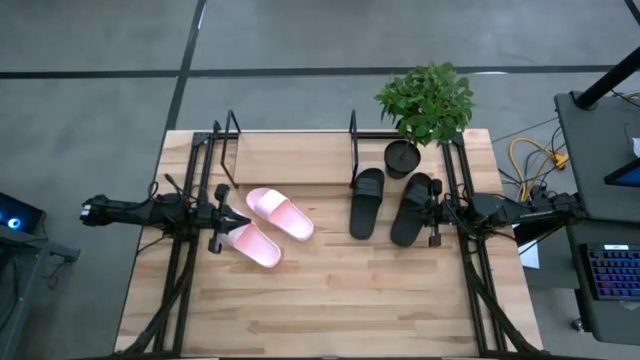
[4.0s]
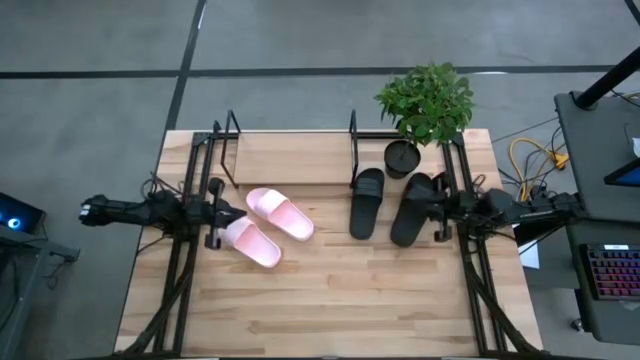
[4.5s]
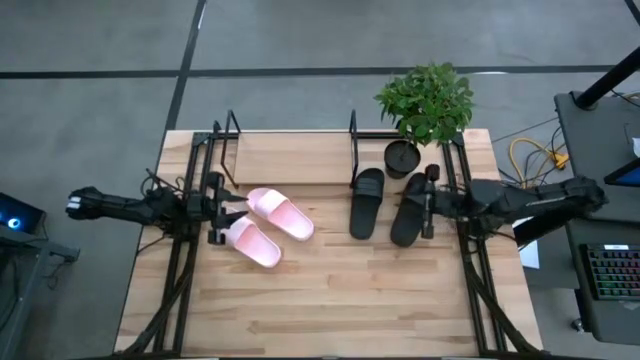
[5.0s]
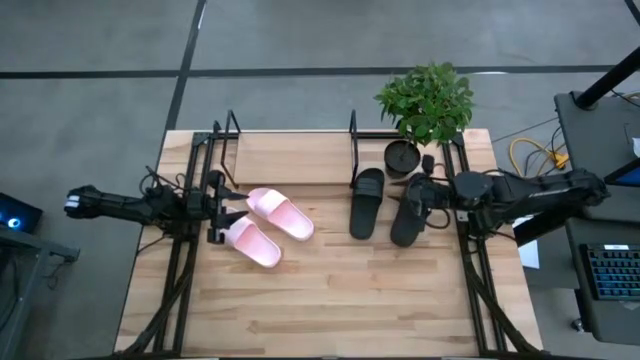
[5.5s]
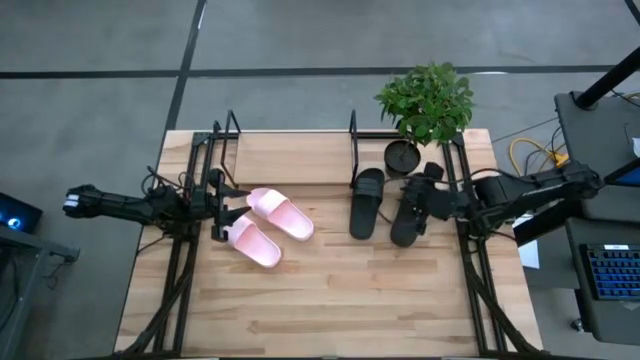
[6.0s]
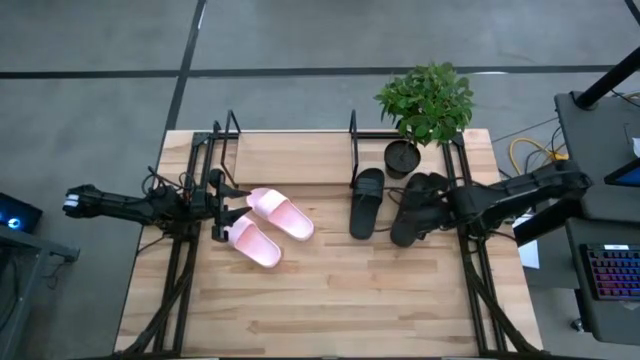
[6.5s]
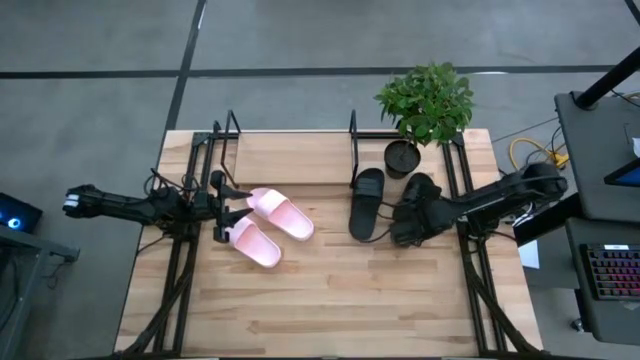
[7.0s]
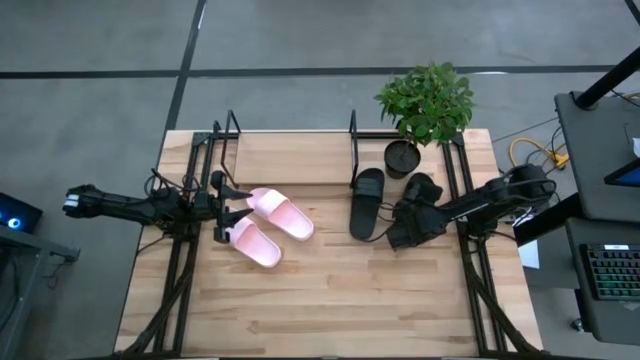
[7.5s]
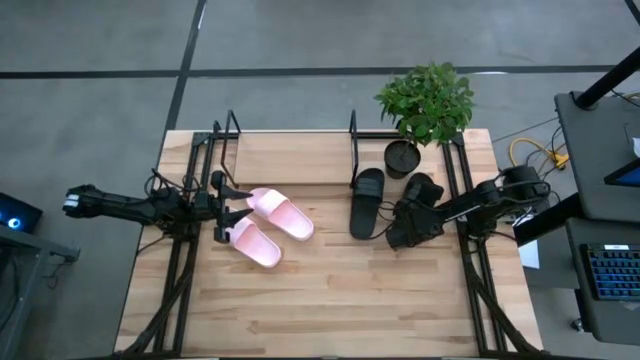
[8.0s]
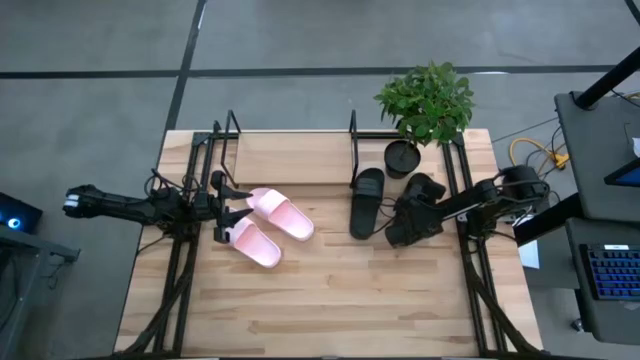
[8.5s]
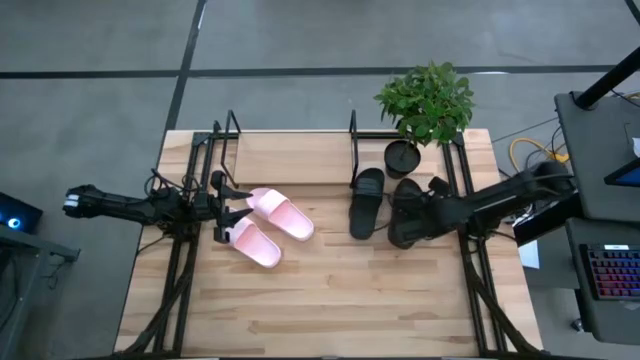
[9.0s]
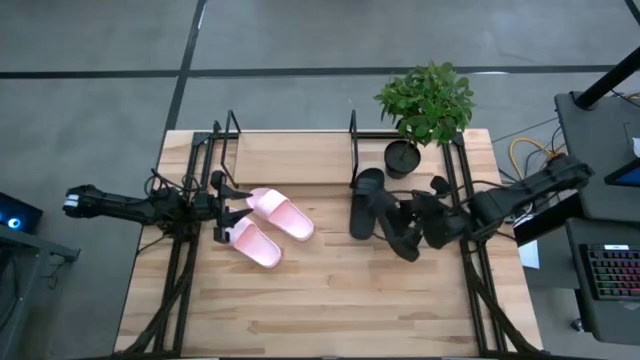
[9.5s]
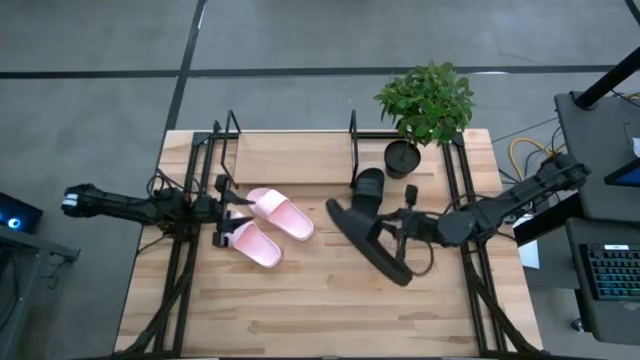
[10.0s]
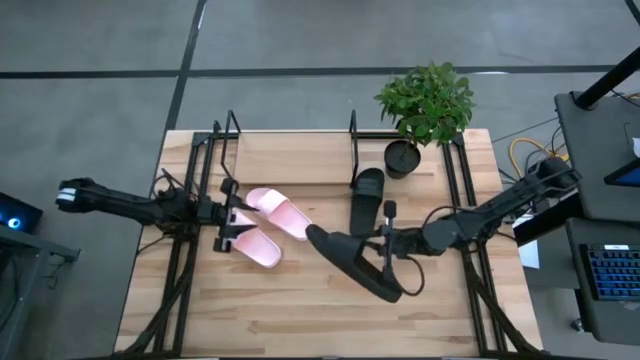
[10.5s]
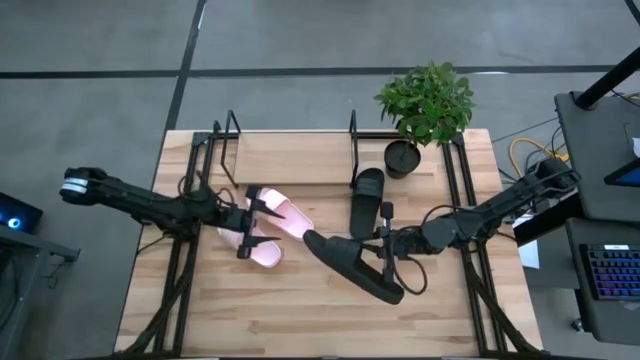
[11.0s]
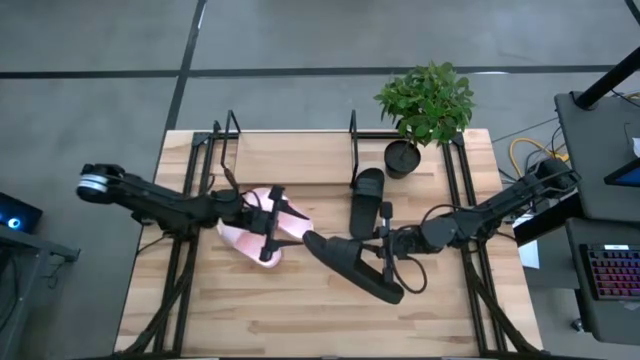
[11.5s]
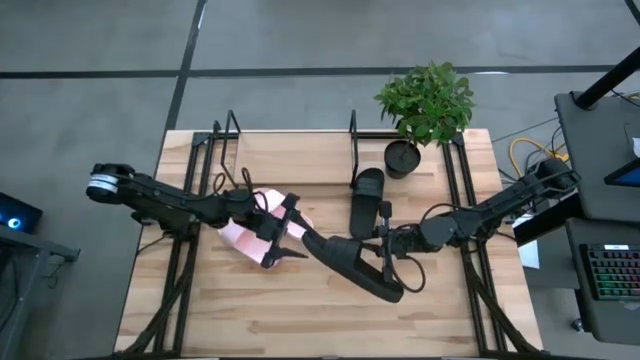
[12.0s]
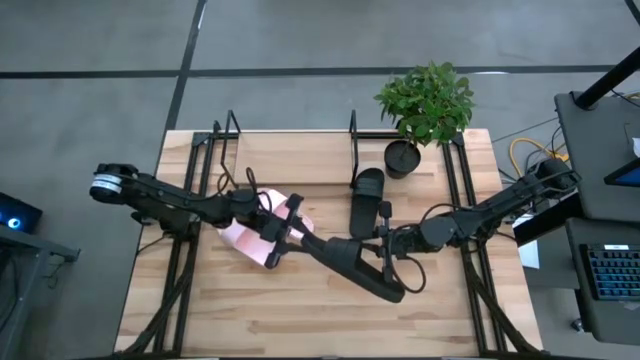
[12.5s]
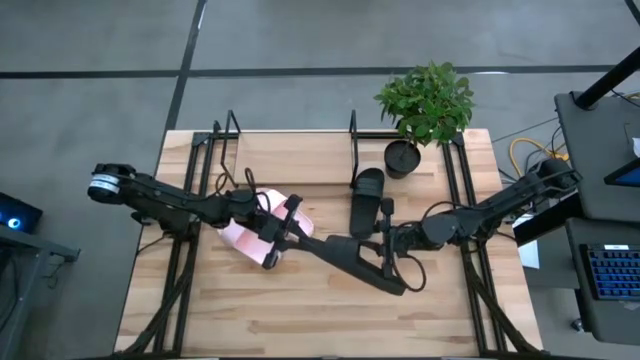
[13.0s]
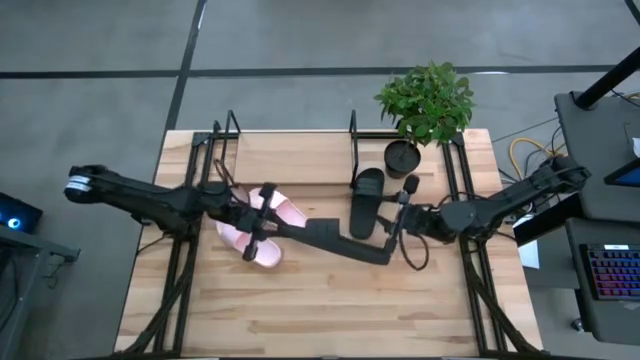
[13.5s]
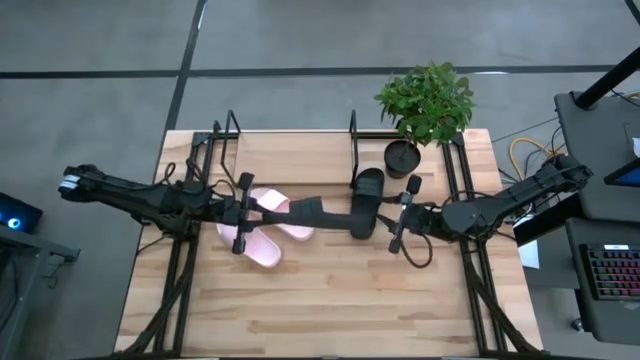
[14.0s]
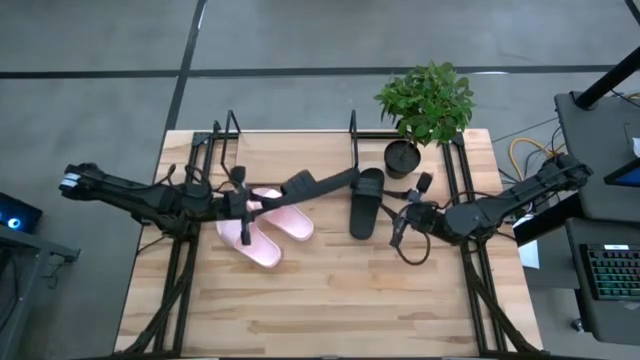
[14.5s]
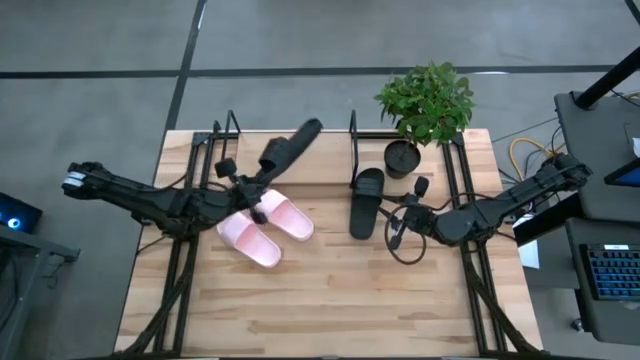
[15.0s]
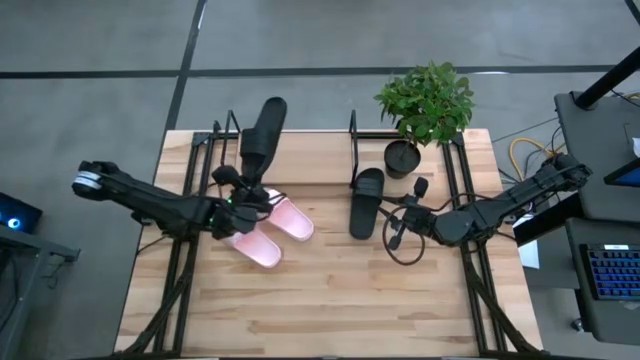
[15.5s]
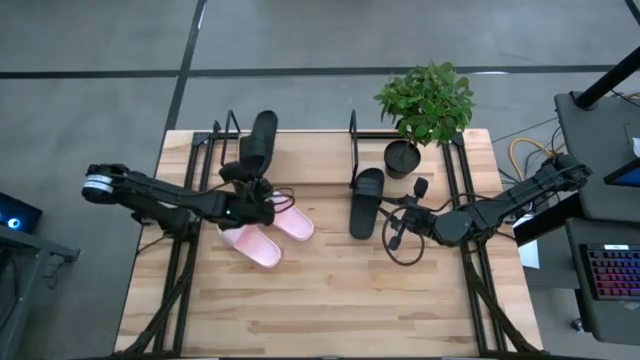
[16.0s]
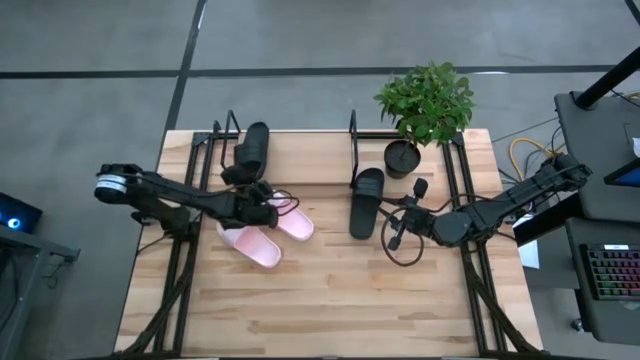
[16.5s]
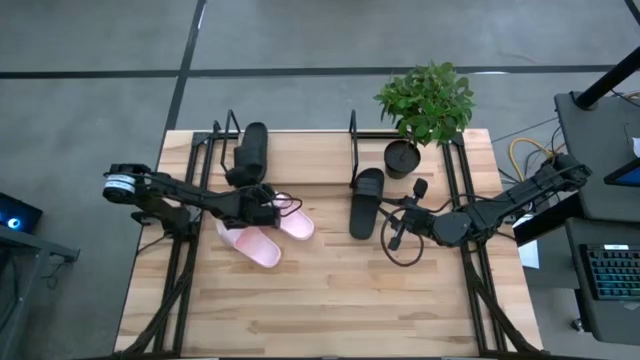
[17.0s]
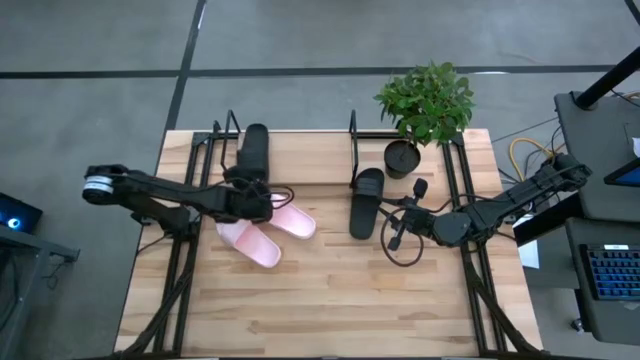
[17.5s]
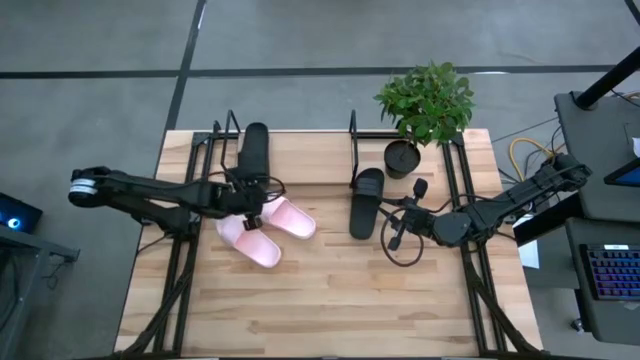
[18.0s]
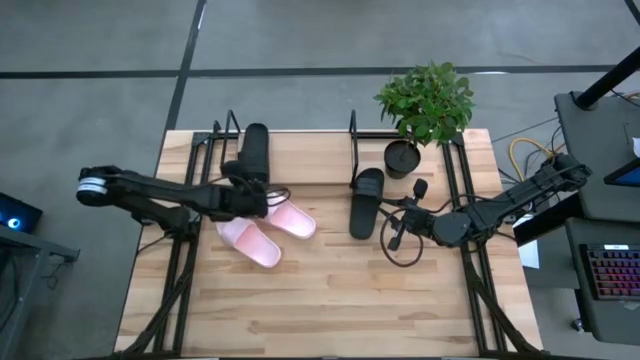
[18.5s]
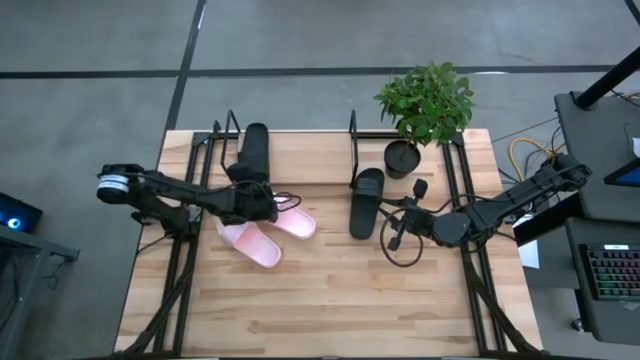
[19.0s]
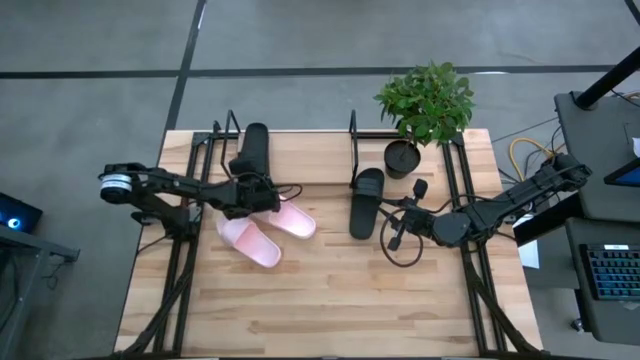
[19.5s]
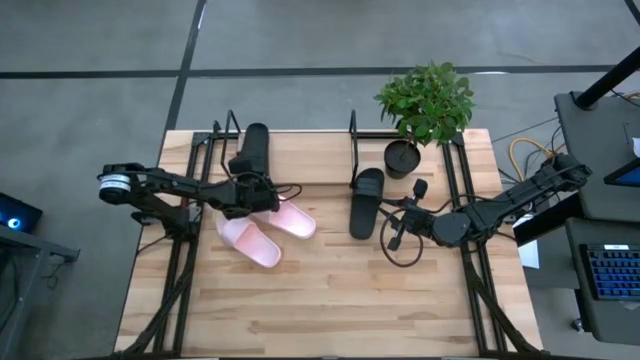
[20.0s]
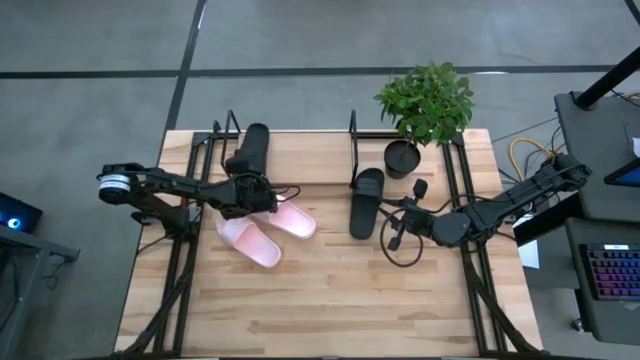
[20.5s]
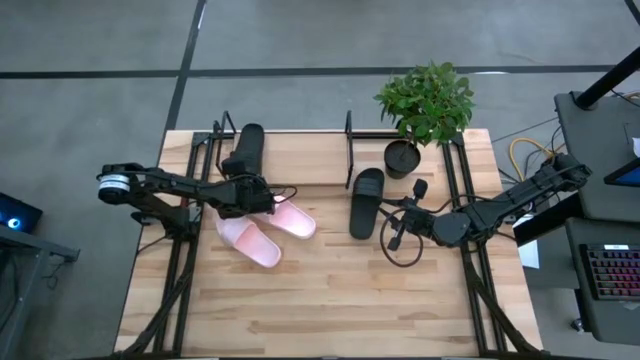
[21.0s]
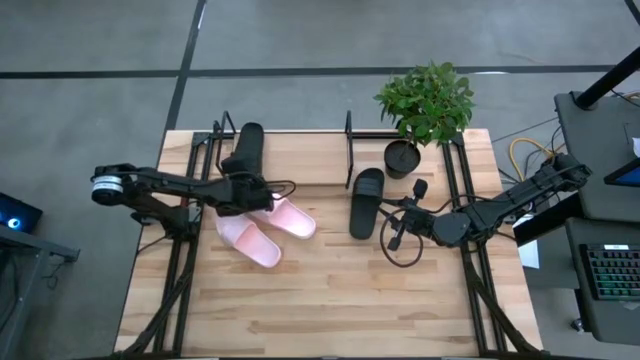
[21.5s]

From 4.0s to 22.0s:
Task: Pick and place slides into the shelf
Put the right black slipper on the shelf

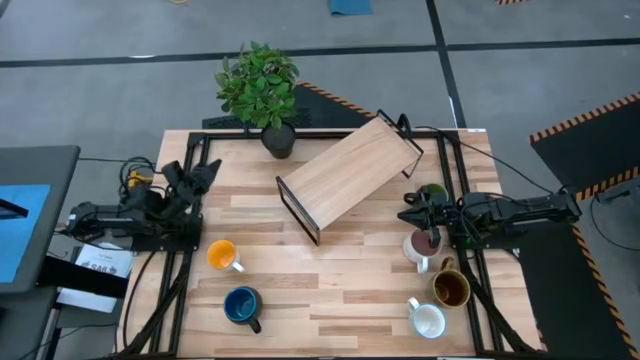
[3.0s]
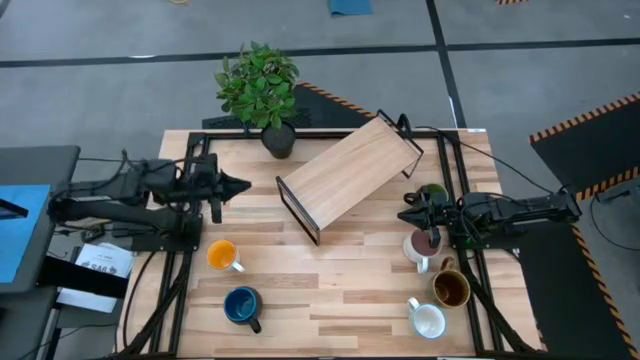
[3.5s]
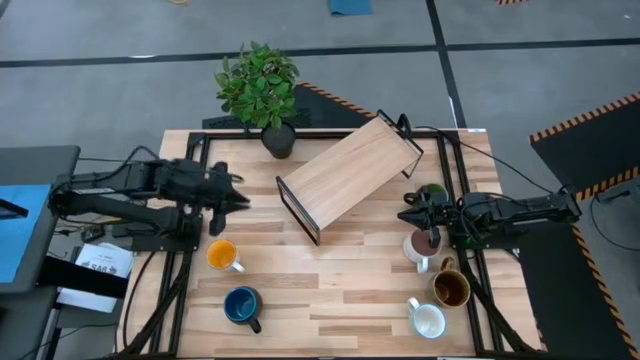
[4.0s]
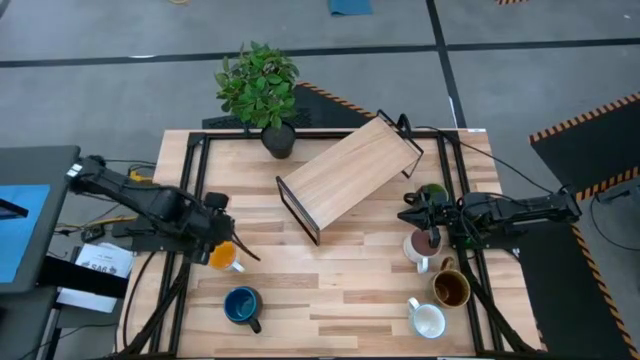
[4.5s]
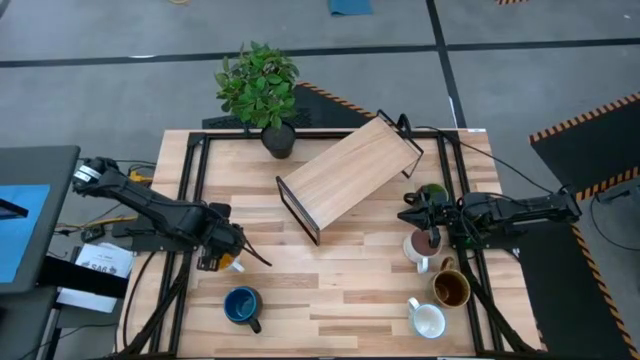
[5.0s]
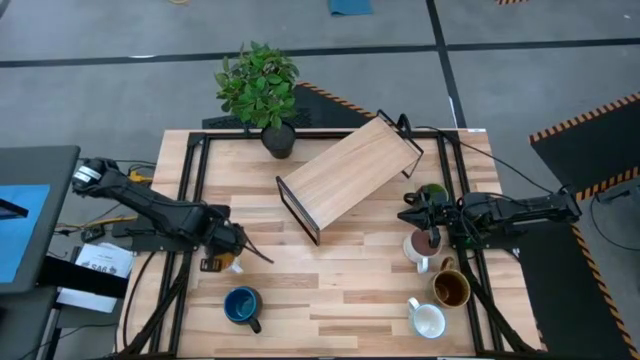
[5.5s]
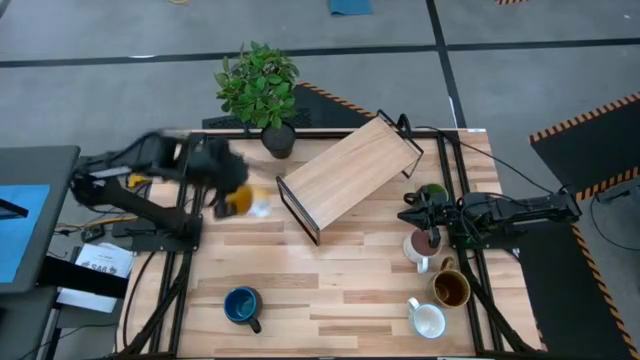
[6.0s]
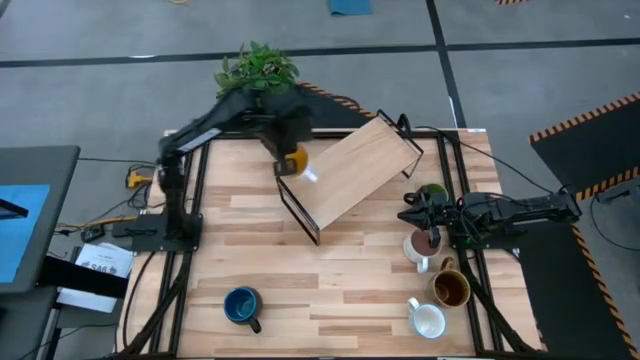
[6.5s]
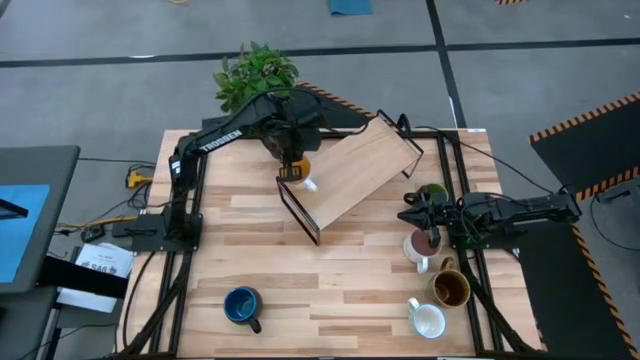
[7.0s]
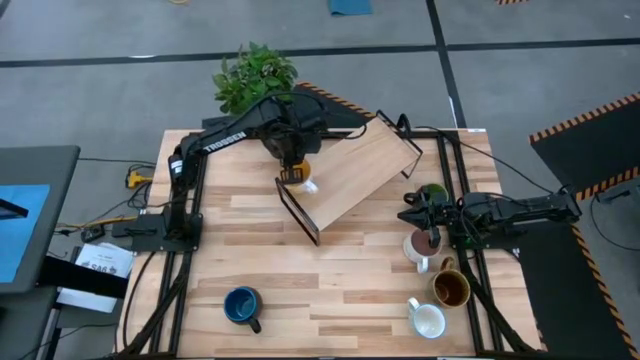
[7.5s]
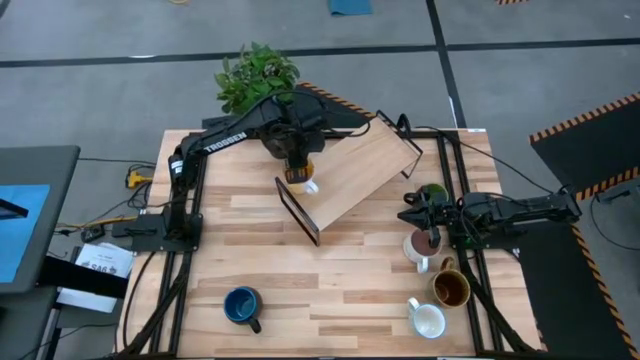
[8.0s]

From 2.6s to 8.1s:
Task: Place coffee mugs
Put the yellow mug on the shelf
